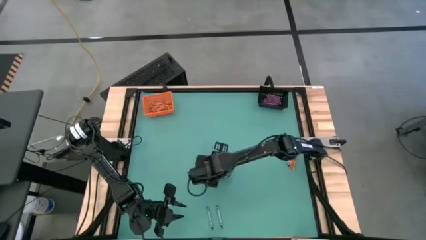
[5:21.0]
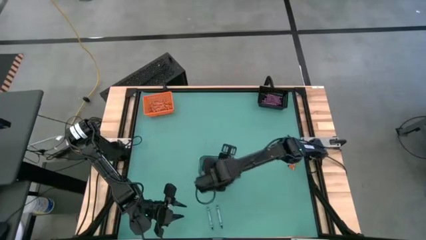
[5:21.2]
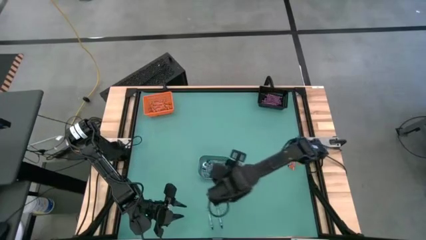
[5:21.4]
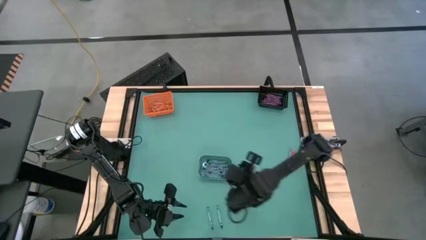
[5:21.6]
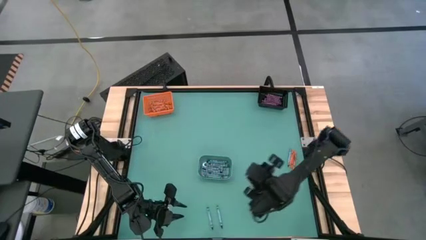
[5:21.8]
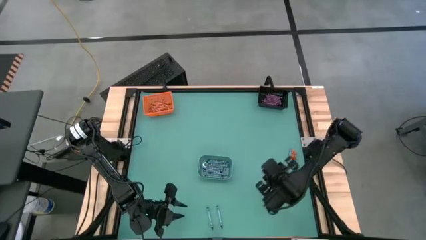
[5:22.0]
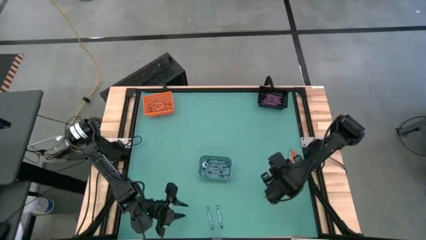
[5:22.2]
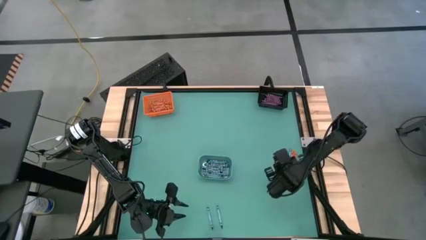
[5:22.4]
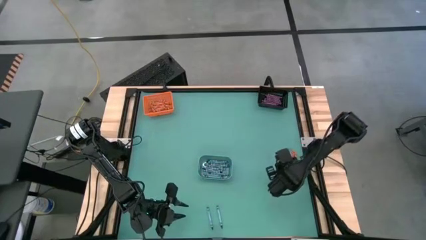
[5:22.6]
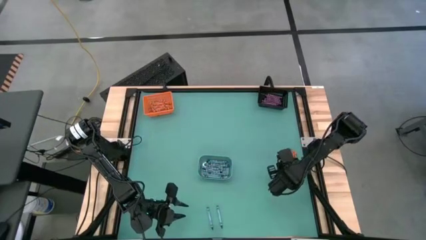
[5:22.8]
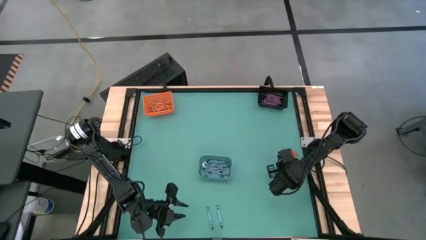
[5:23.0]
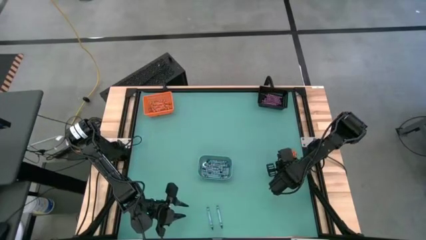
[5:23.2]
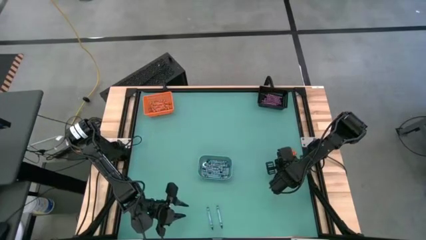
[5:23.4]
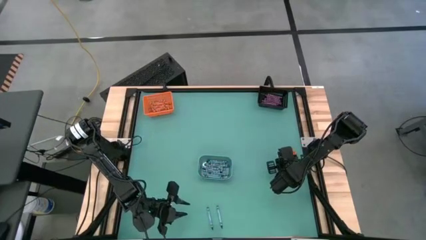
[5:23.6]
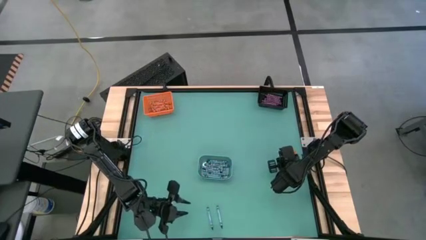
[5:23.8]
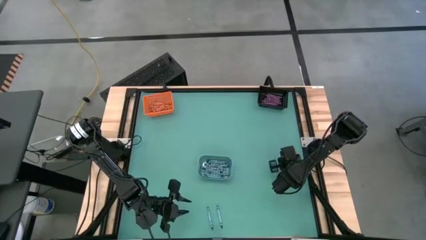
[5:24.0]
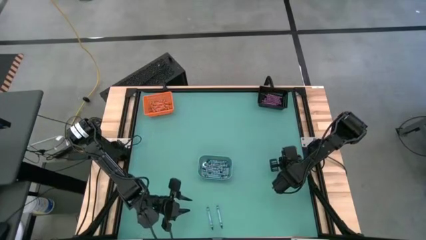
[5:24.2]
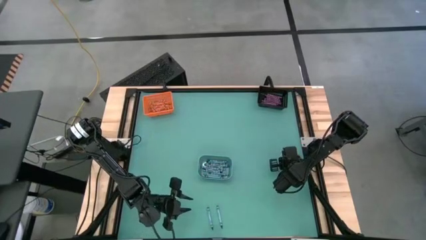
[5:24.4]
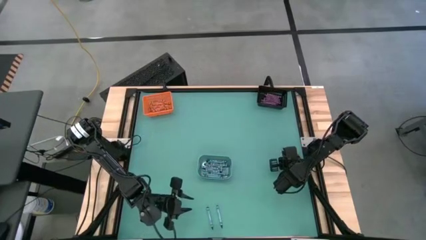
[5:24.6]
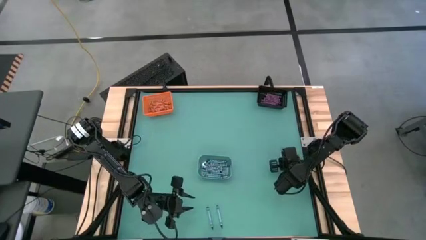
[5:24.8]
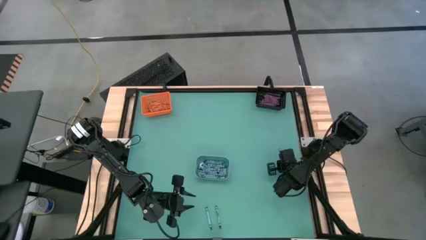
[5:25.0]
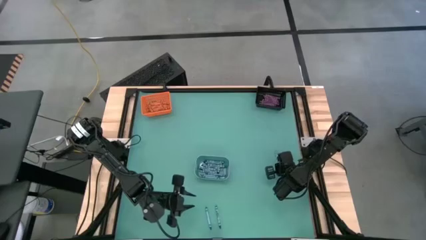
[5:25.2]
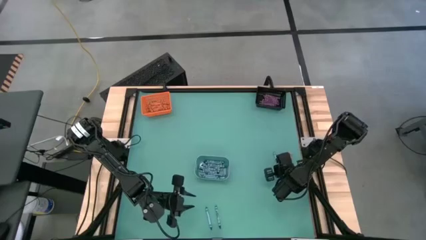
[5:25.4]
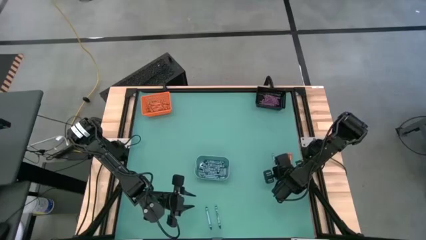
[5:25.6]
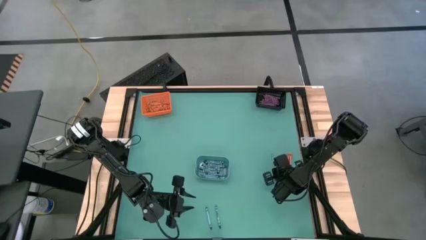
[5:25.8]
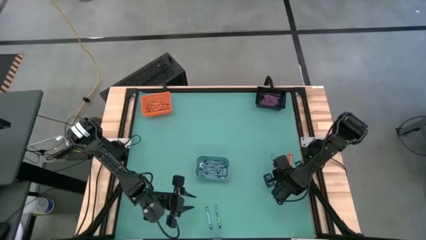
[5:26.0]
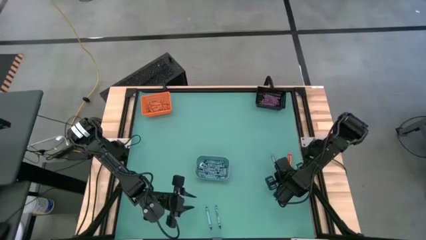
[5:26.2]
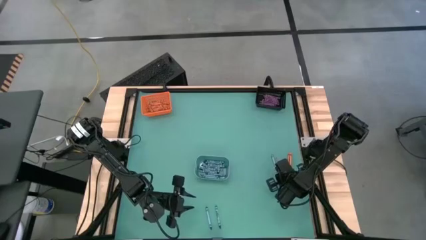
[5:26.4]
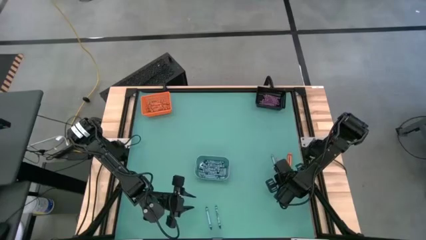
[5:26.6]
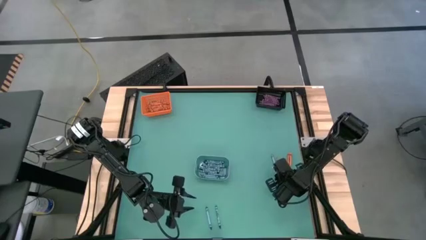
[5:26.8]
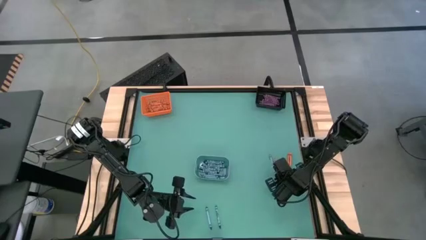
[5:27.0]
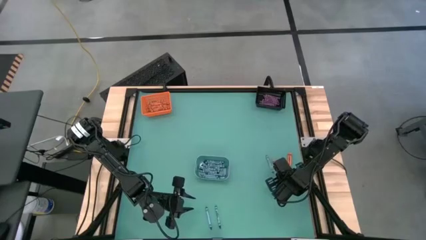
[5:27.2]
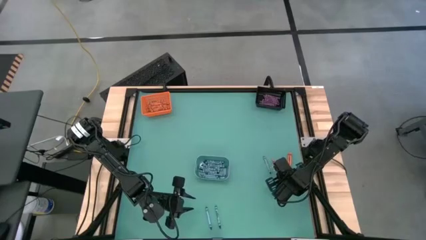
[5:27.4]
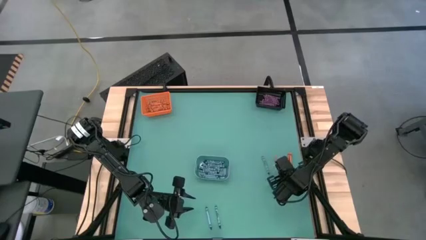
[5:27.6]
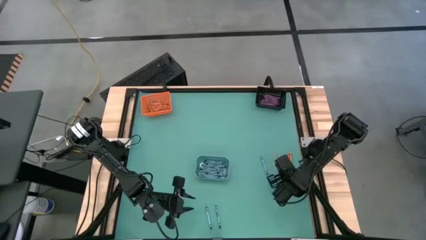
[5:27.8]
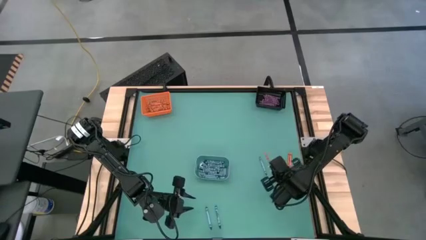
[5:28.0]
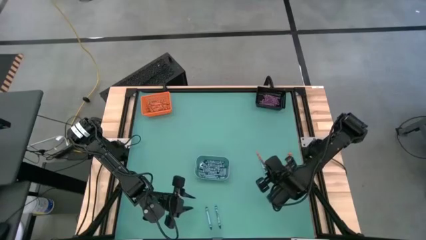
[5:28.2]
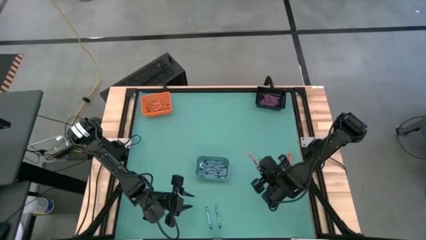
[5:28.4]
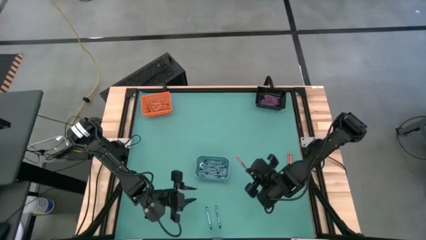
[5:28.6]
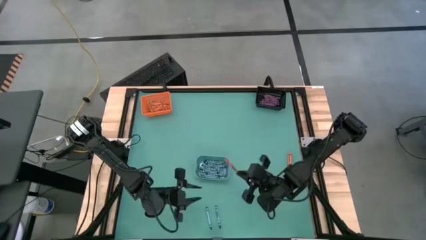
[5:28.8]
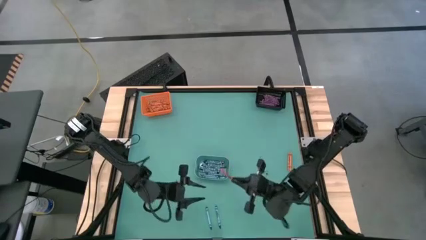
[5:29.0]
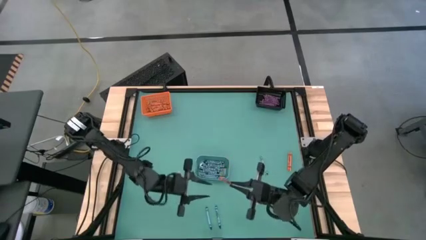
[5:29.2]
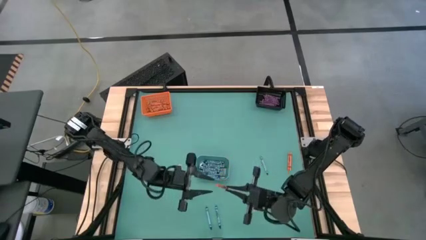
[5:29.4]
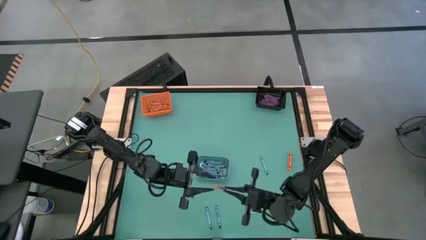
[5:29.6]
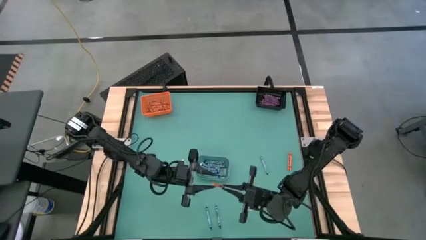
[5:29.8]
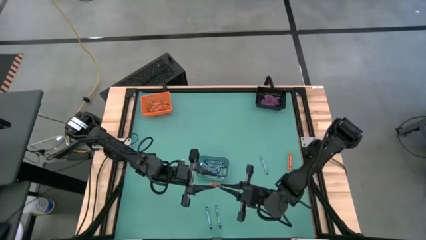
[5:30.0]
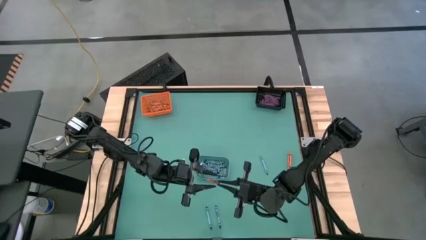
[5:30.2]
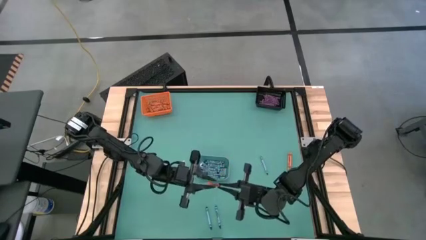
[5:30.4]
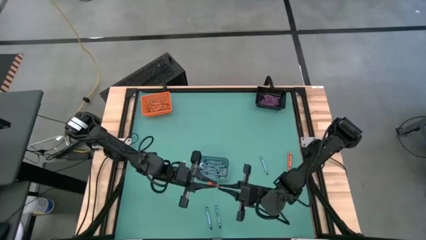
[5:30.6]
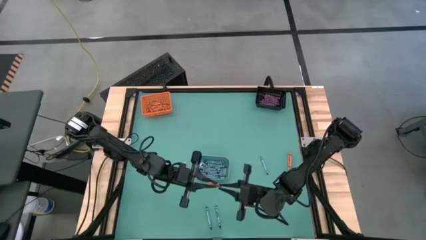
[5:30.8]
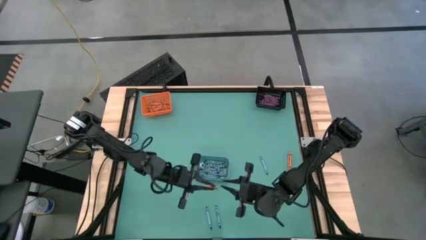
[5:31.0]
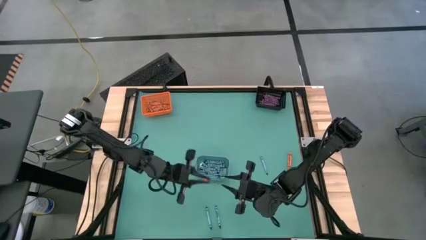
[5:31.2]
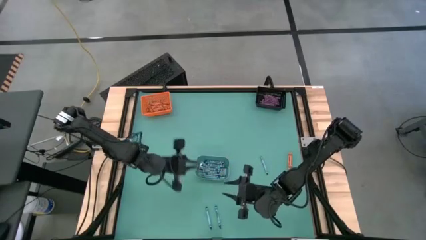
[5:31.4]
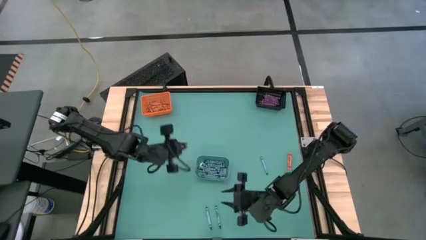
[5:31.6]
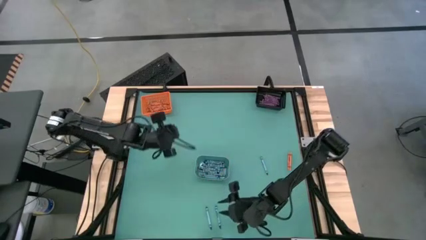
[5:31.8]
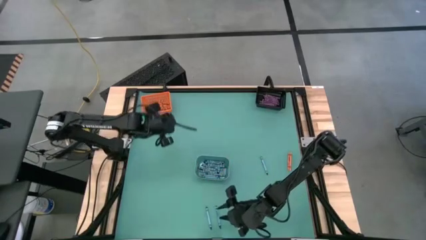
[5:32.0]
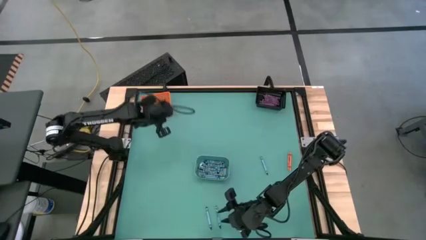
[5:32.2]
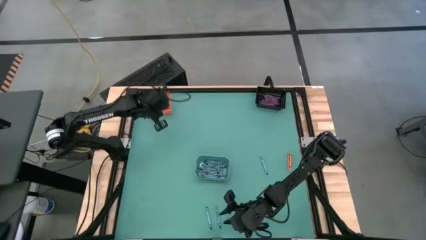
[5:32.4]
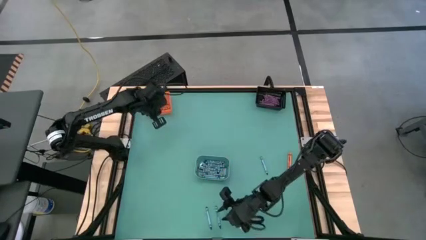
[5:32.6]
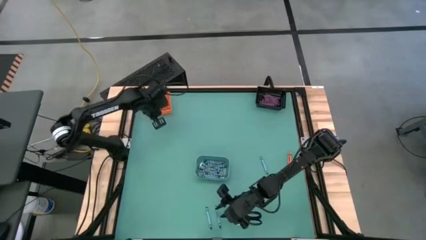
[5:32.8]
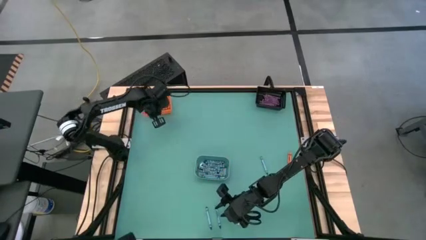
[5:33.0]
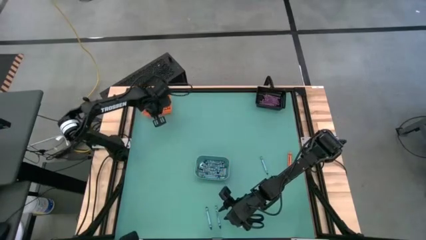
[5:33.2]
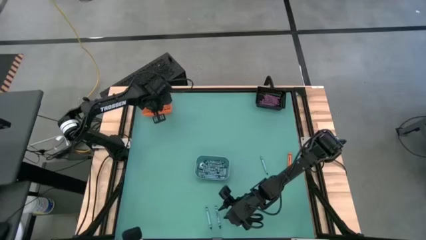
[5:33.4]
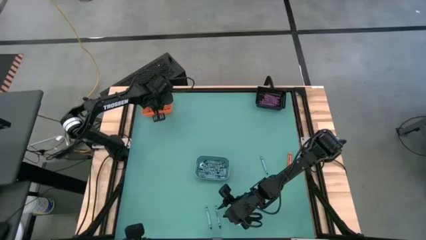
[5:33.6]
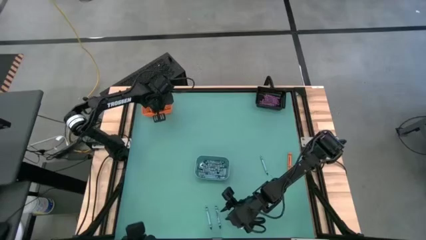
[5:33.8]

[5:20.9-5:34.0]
Task: Sort crayons
Put the orange crayon into the orange bin

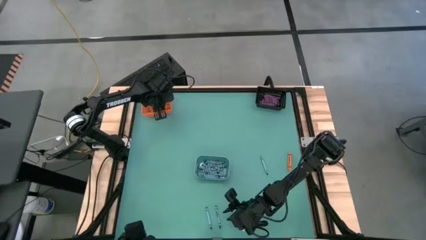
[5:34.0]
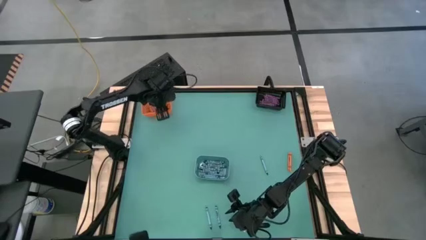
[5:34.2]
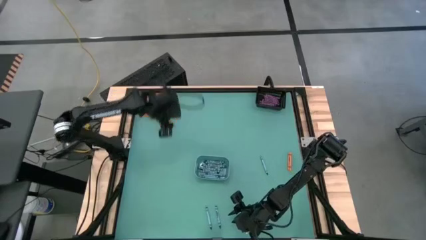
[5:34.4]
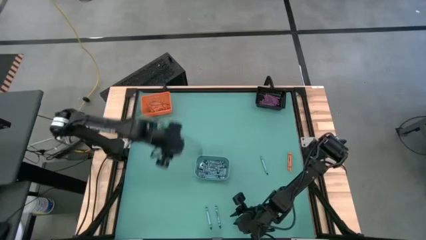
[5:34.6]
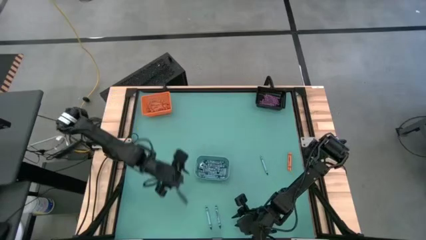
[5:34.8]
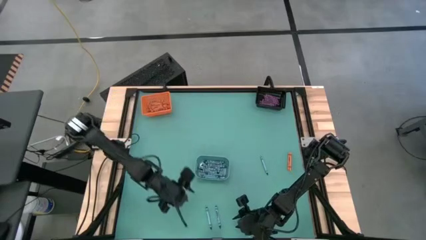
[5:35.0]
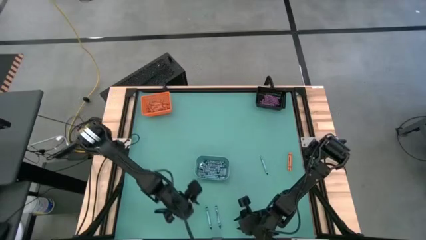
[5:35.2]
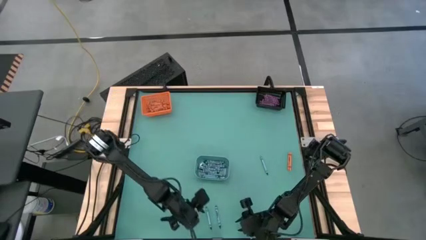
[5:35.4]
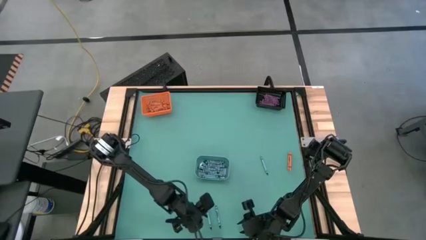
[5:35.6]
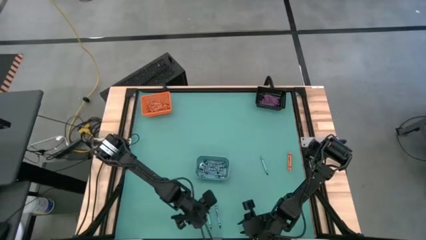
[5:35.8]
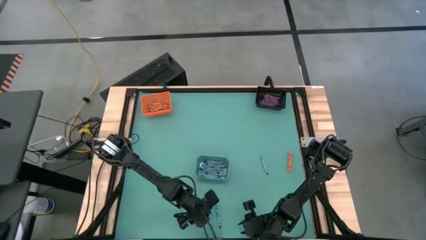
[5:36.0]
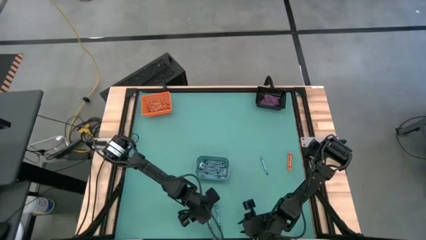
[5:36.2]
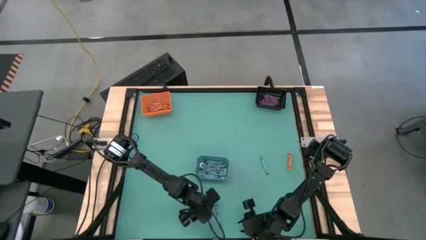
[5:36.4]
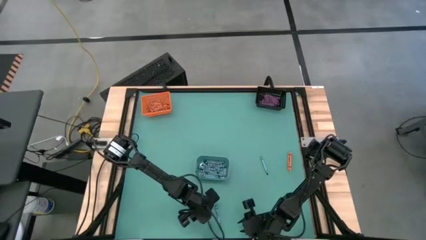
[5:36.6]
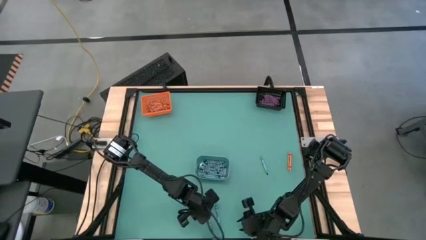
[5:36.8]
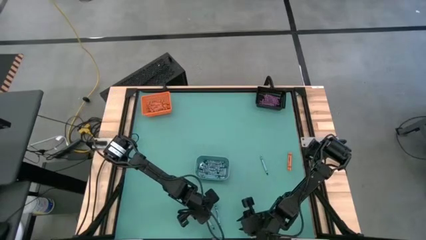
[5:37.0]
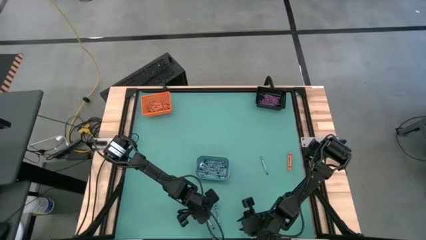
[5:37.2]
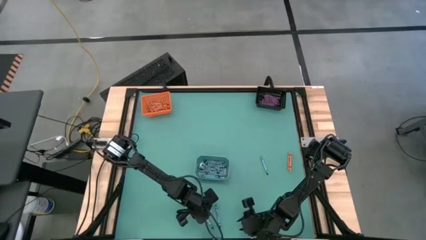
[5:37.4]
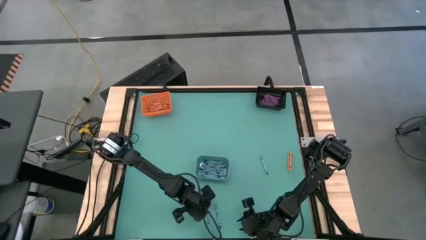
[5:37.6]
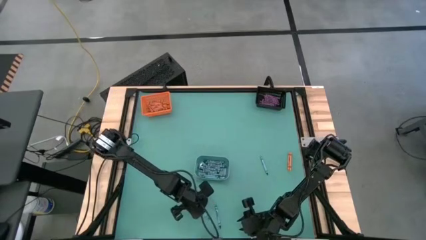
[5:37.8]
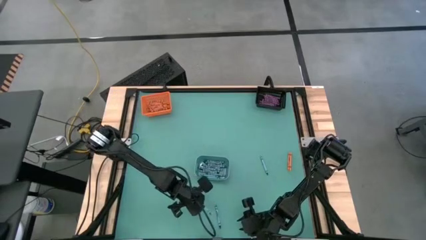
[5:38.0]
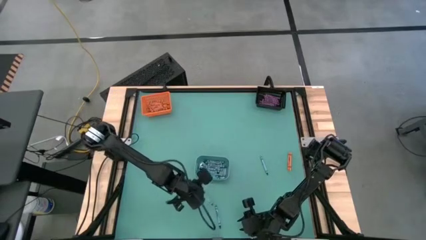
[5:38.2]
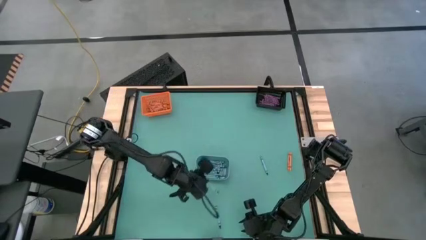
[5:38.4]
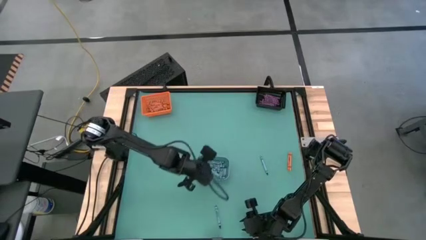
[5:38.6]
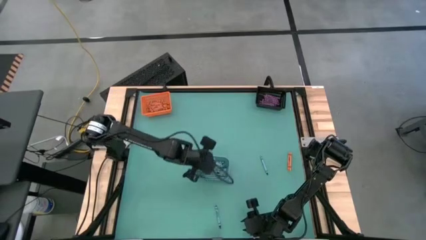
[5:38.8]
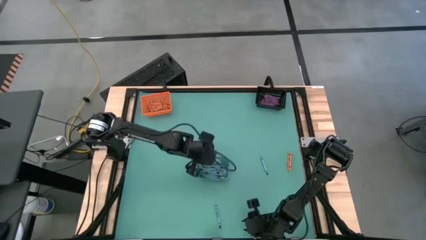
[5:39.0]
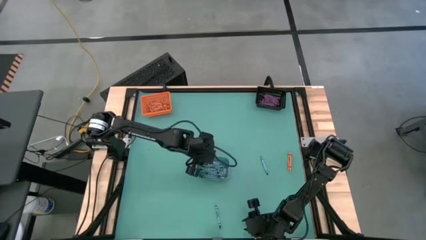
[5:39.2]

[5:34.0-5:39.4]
Put the blue crayon into the blue bin
